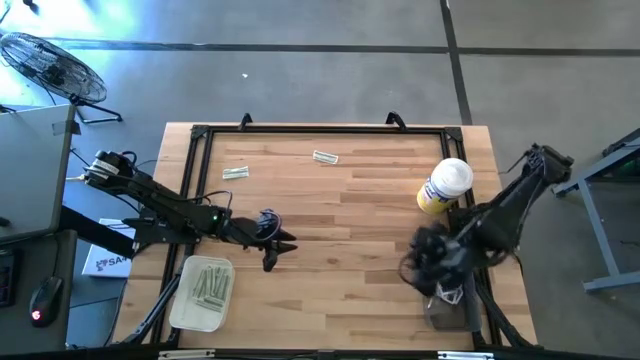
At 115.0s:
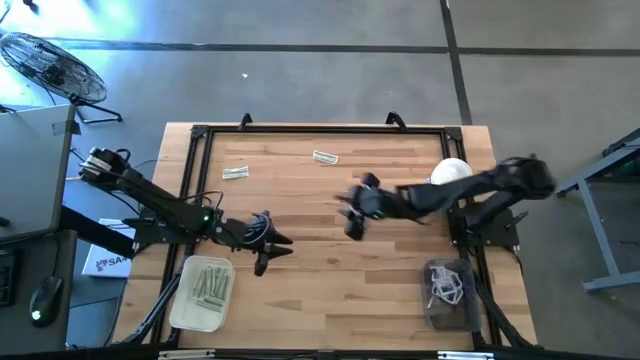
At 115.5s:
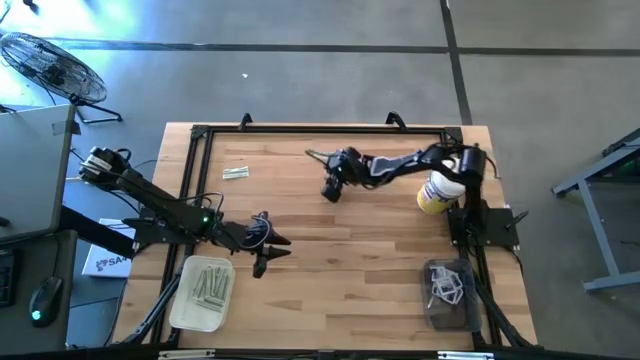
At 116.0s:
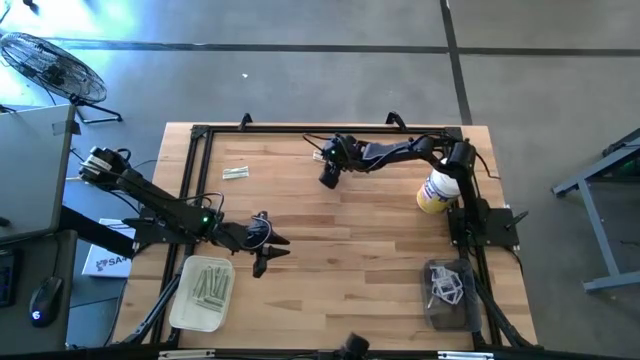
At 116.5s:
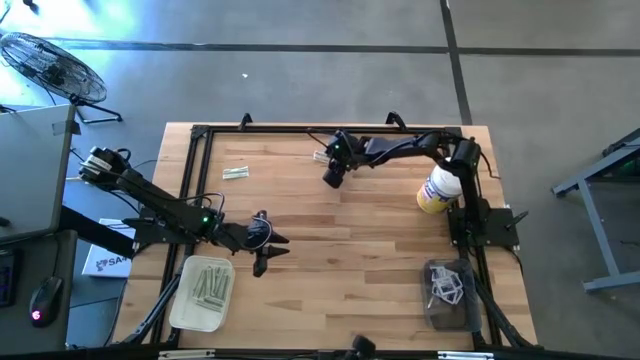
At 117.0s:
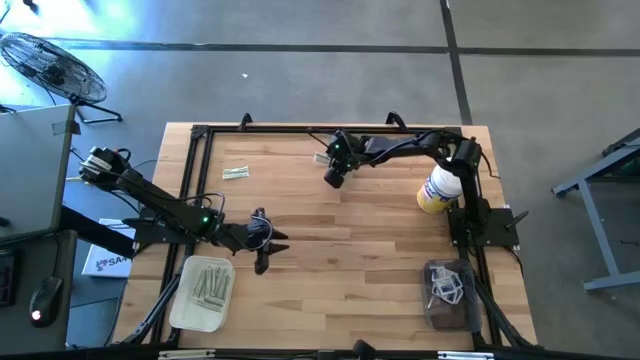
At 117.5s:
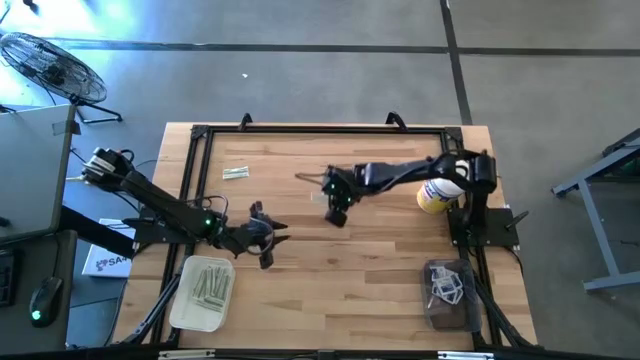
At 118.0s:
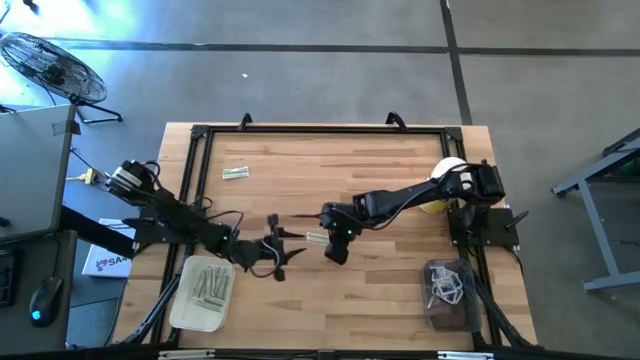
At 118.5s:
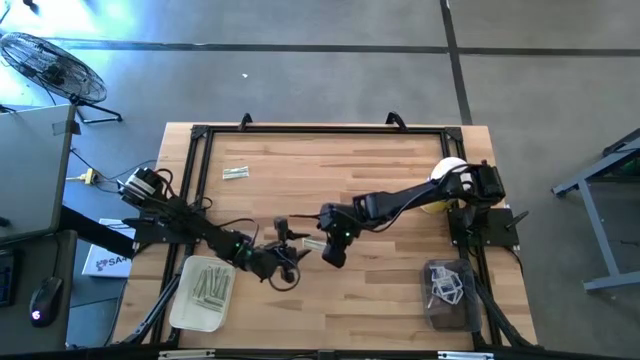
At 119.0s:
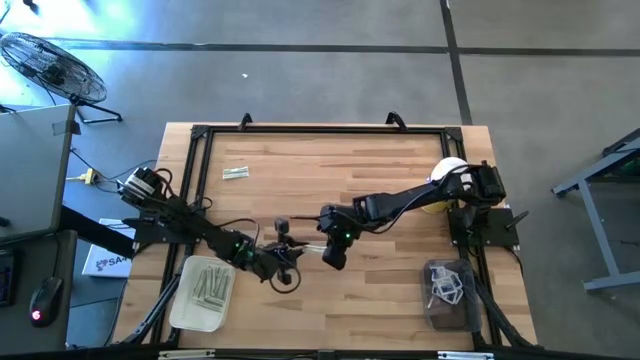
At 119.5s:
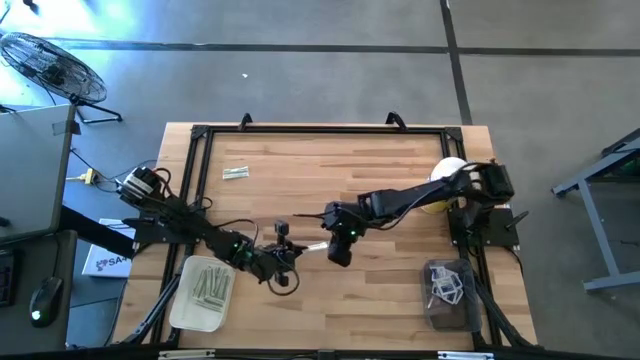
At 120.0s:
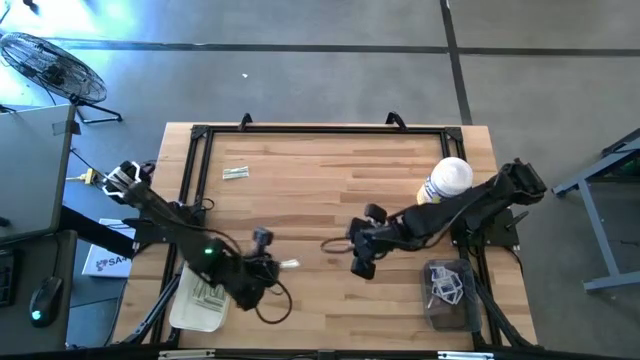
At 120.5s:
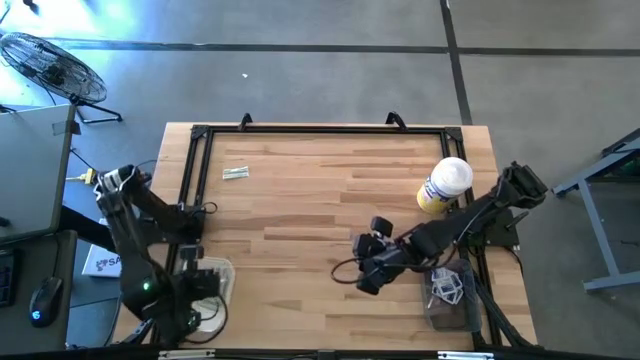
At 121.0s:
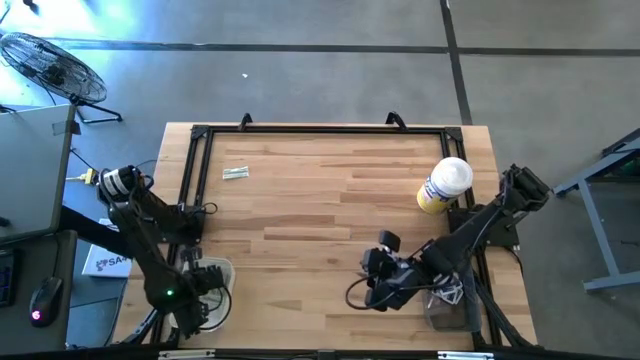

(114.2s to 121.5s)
Task: Pick & Place First Aid Supplies
Put the green bandage into the white bin

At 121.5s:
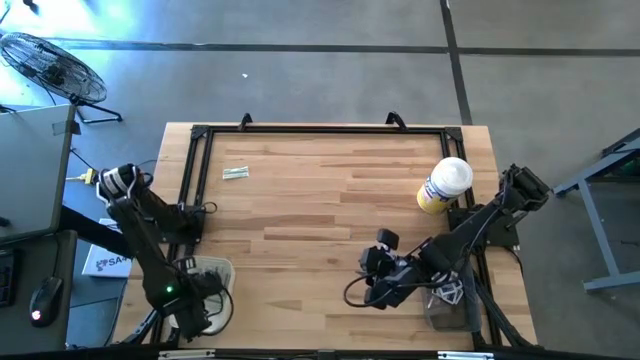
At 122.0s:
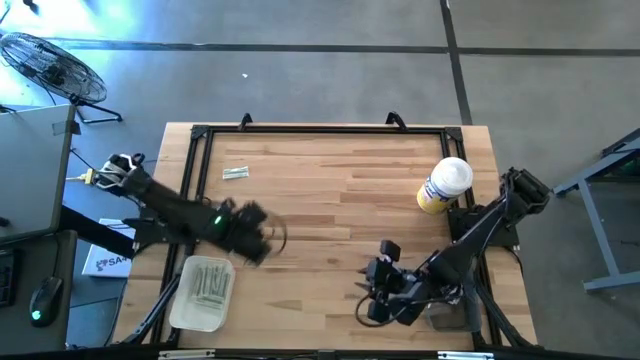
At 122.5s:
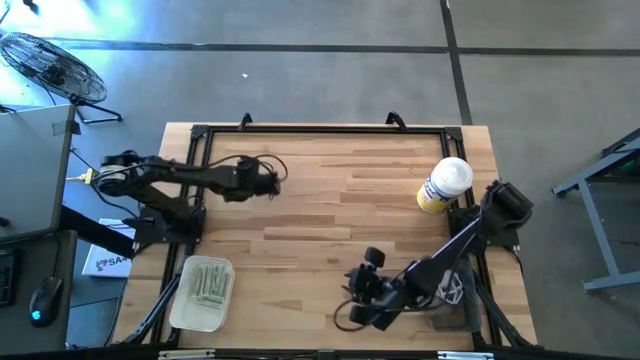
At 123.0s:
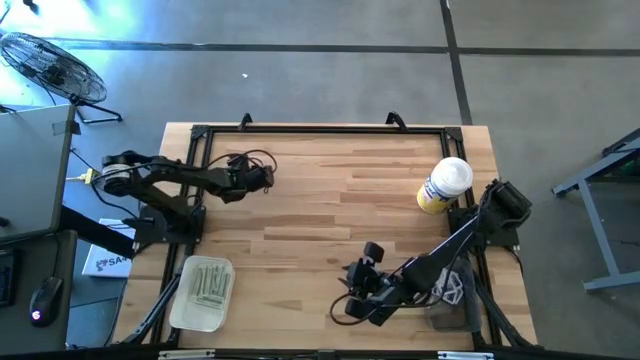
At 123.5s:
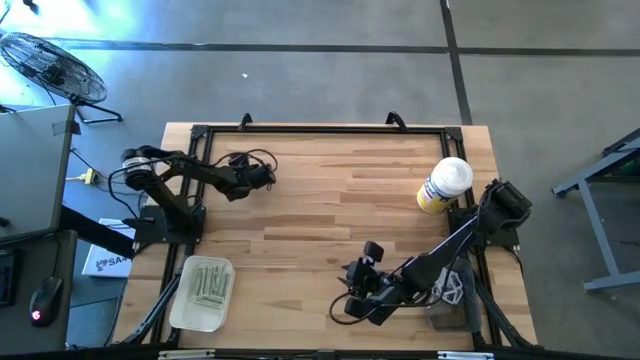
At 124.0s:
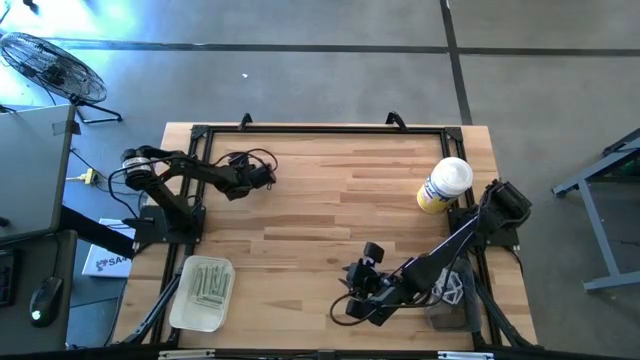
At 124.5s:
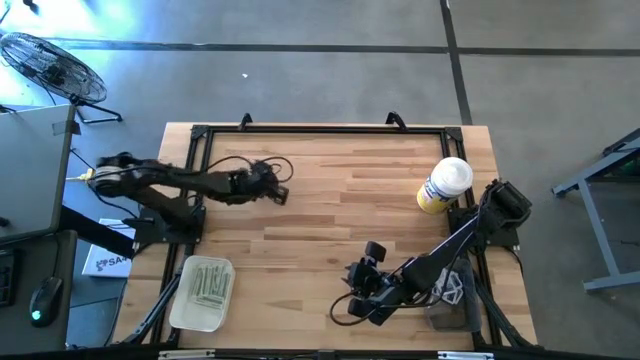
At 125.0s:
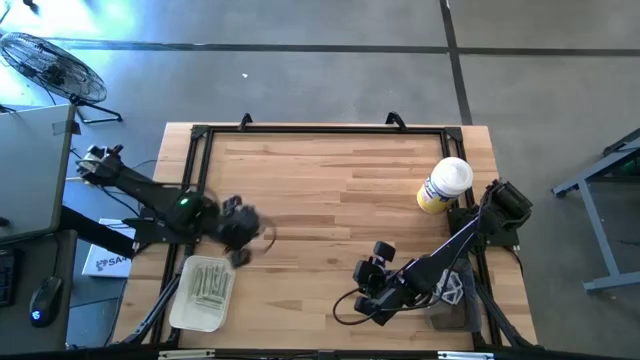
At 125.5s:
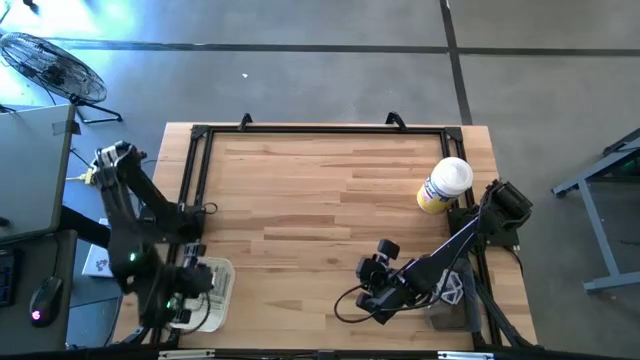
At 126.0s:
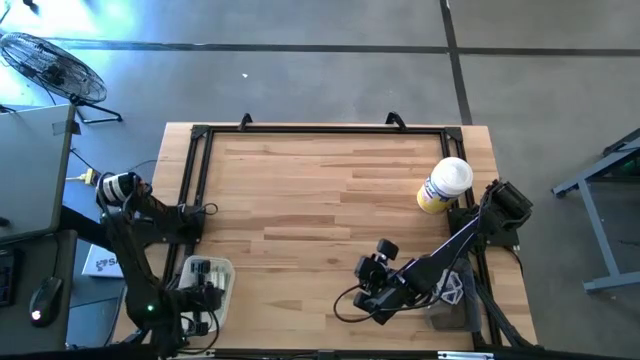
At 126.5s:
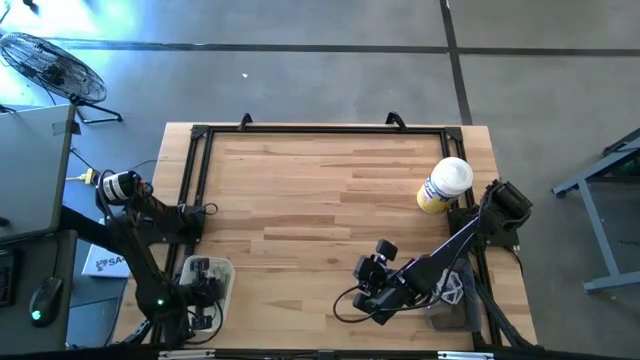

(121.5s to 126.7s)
Put the green bandage into the white bin

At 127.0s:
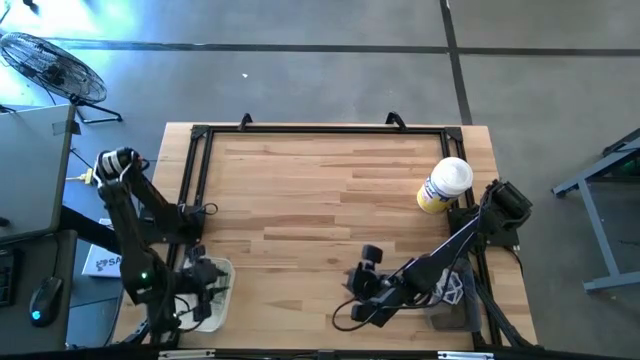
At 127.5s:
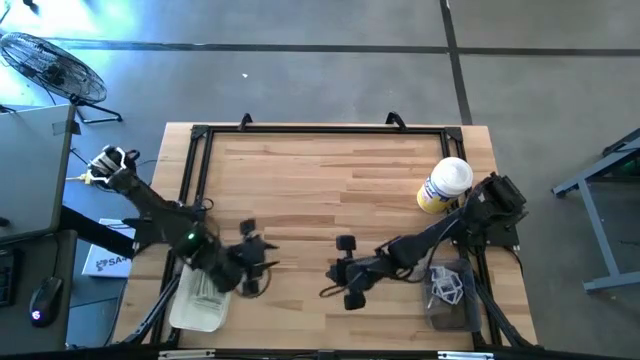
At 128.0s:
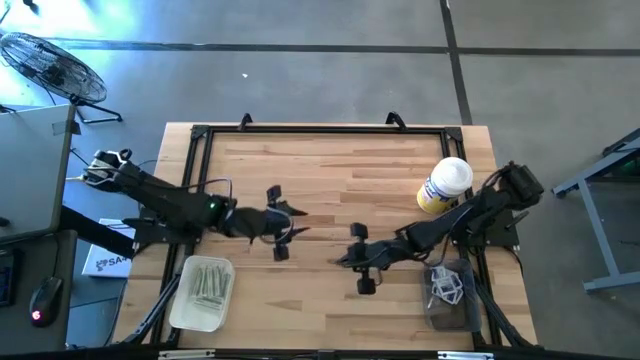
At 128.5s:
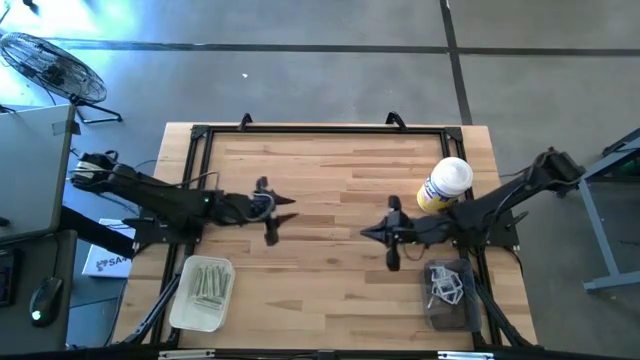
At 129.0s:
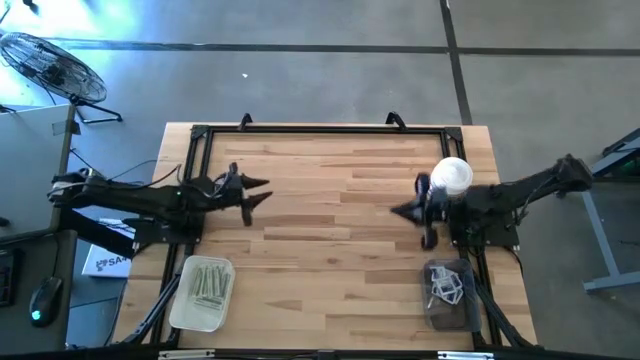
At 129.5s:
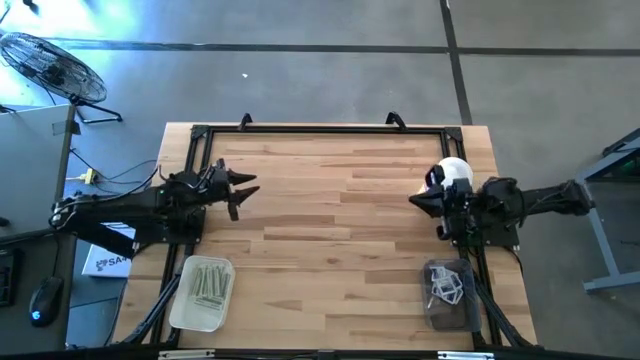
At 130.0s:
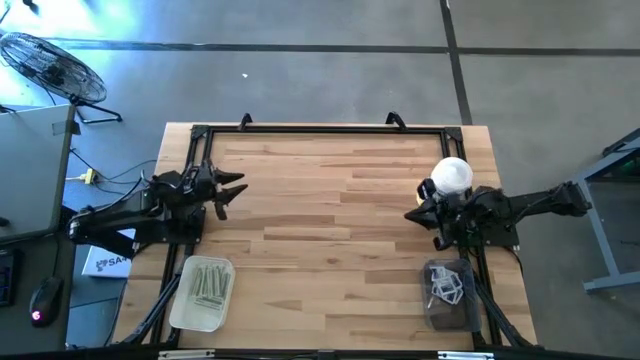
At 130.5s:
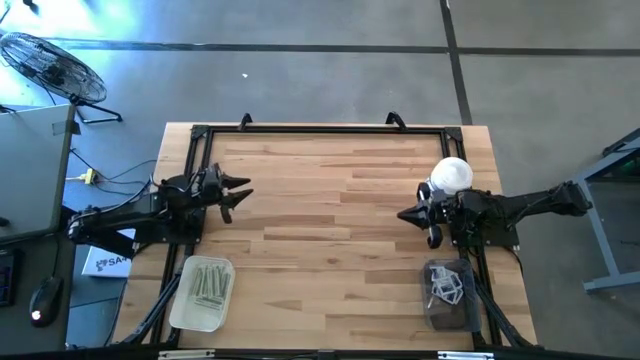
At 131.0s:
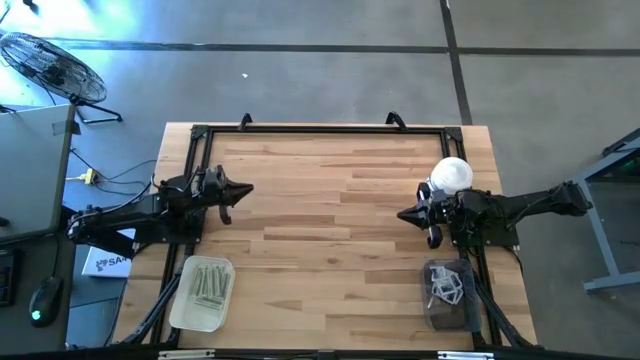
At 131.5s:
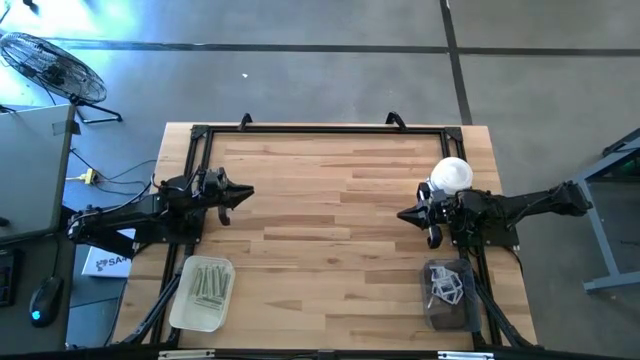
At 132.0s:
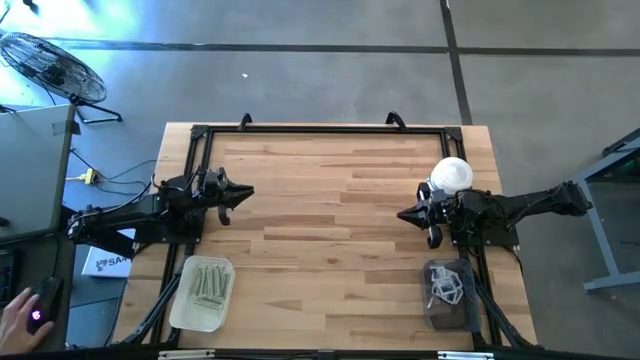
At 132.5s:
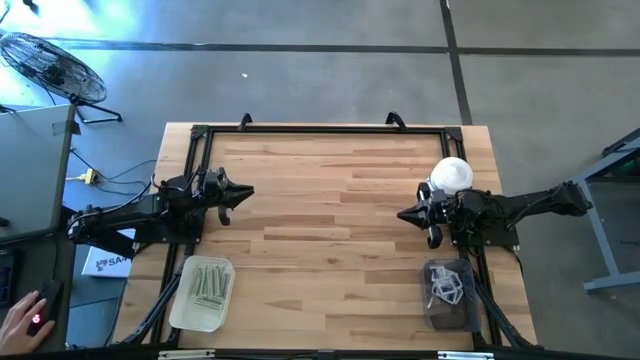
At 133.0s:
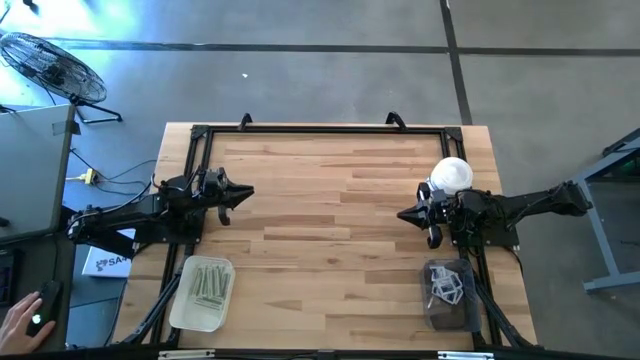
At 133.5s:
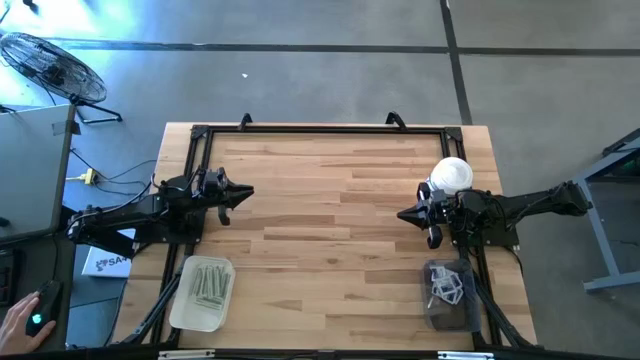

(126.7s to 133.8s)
Return to Home Position

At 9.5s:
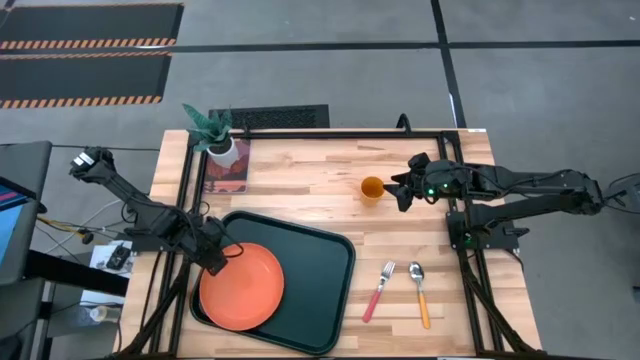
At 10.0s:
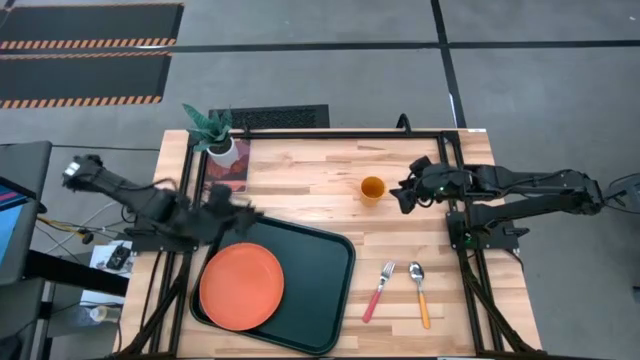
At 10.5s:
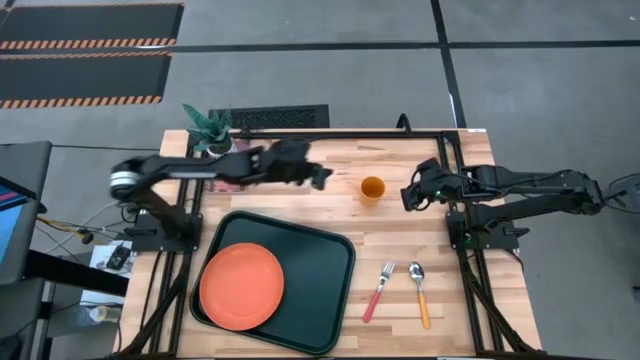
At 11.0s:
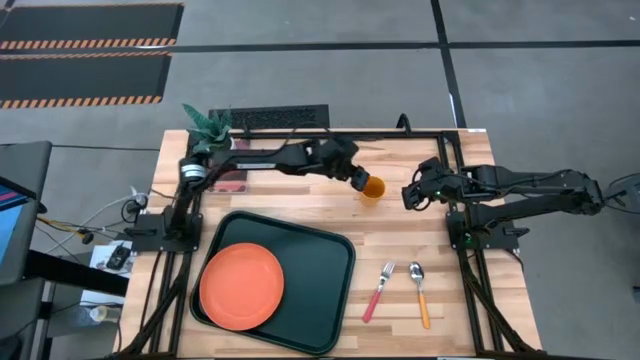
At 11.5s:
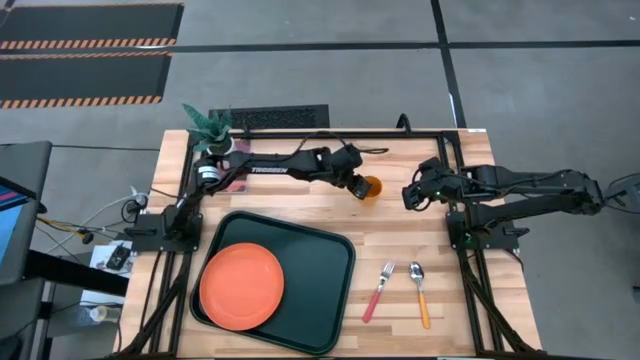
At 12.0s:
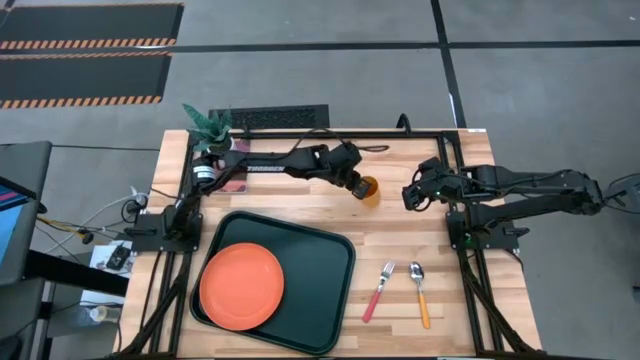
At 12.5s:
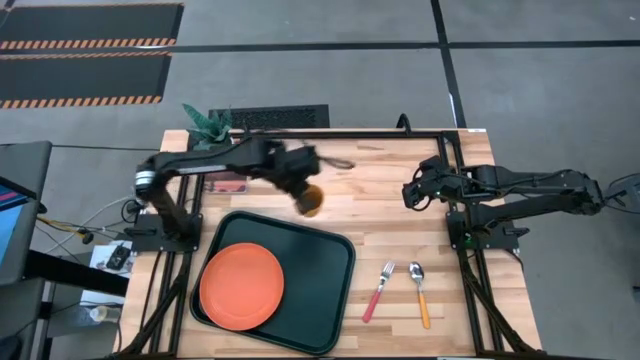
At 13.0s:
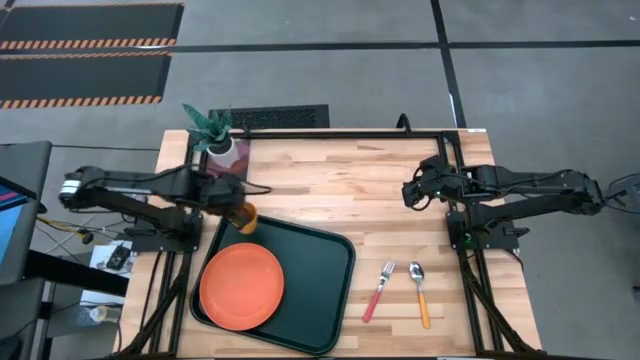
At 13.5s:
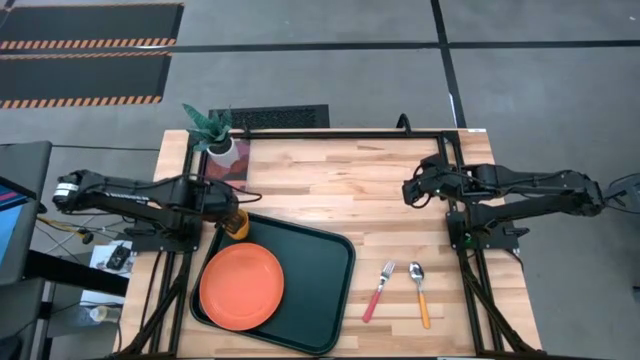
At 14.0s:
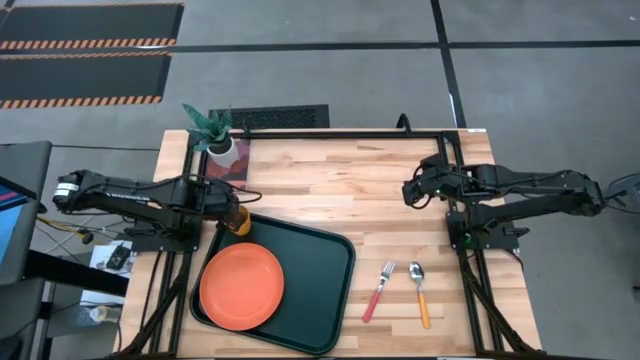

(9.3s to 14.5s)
Task: Pick and place plate/cup/fork/spoon on tray
Put the yellow cup on the top left of the black tray
